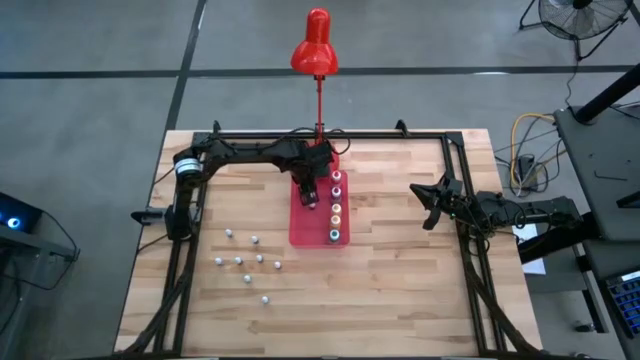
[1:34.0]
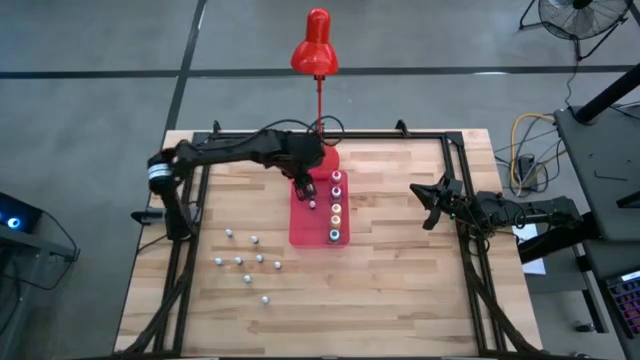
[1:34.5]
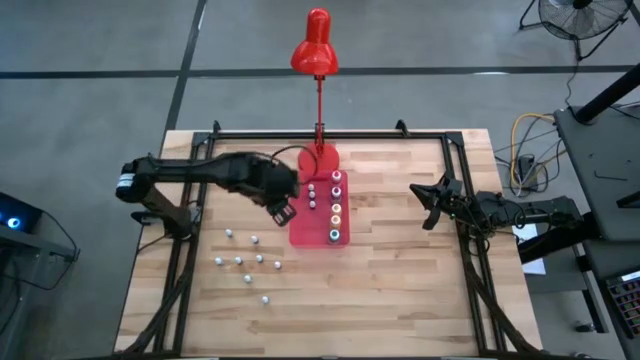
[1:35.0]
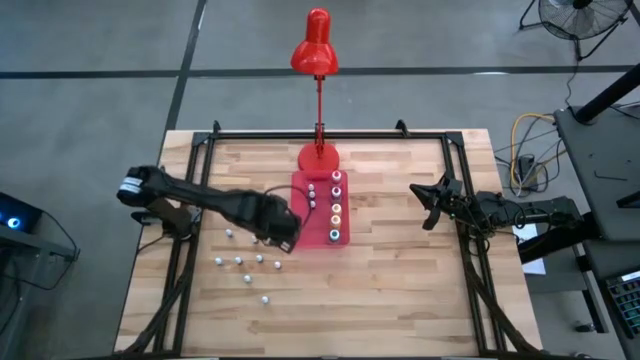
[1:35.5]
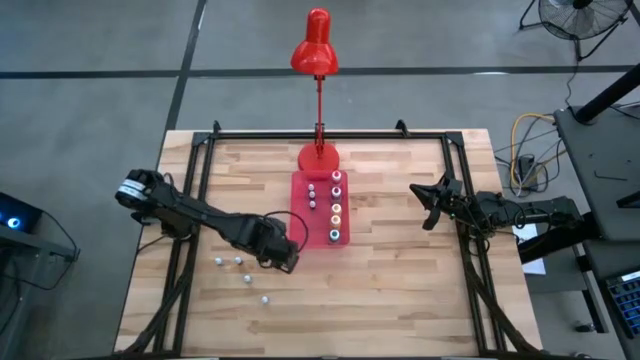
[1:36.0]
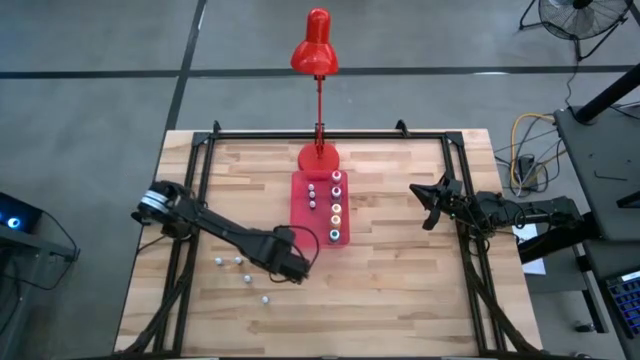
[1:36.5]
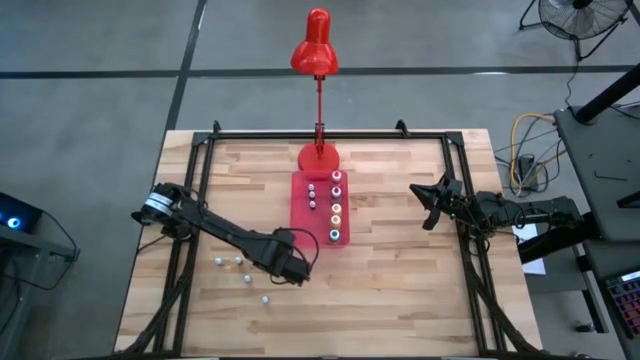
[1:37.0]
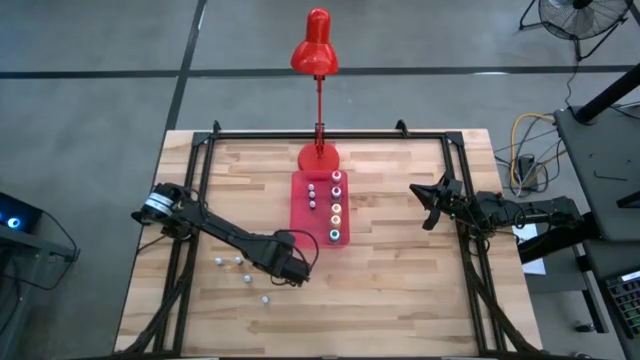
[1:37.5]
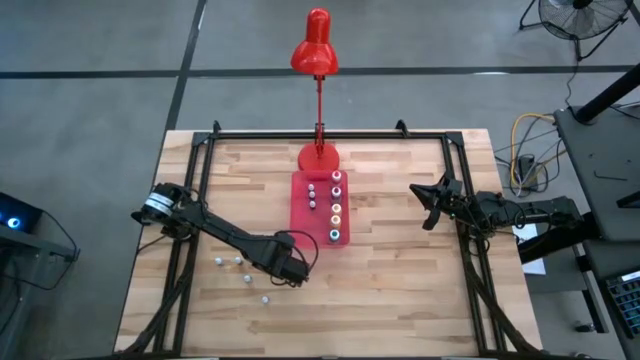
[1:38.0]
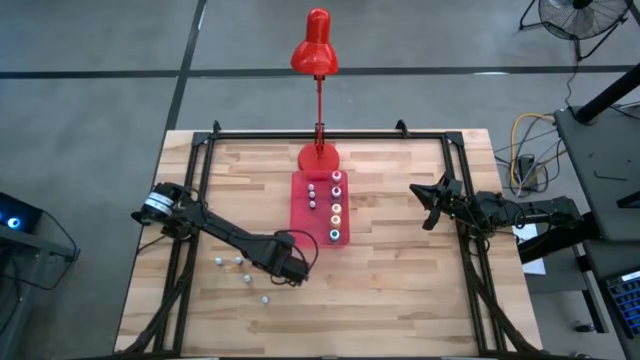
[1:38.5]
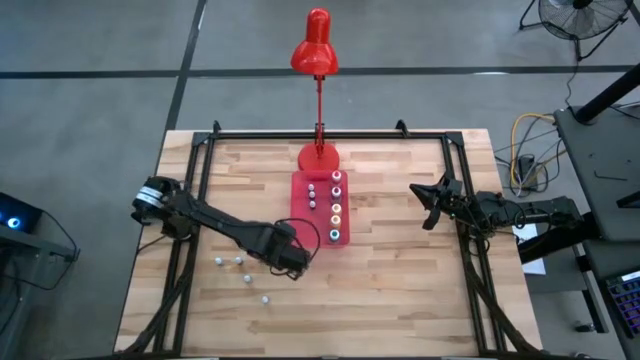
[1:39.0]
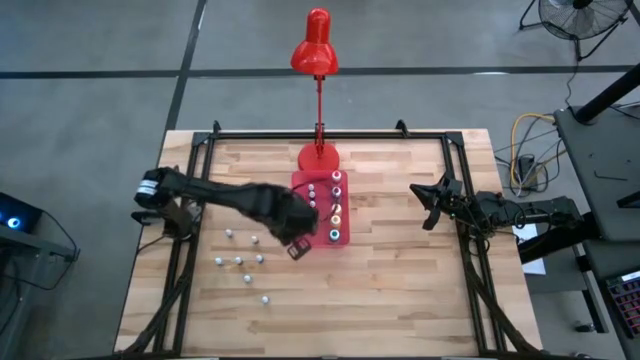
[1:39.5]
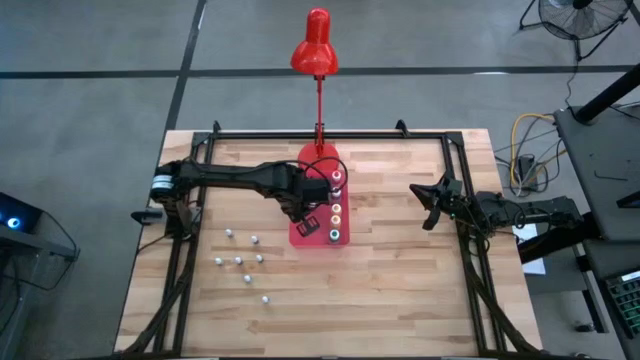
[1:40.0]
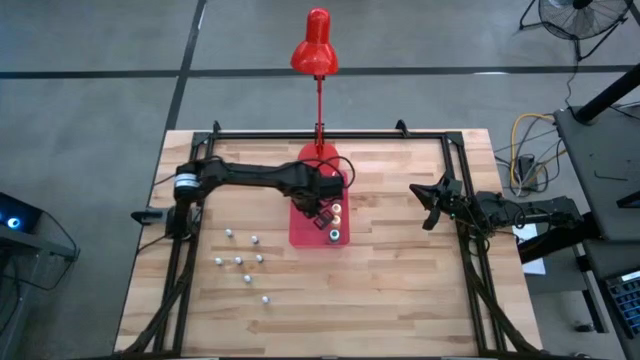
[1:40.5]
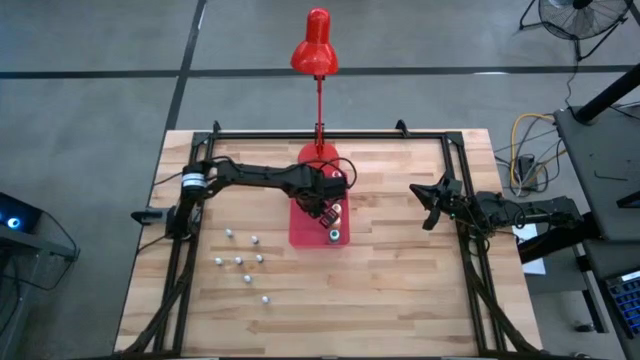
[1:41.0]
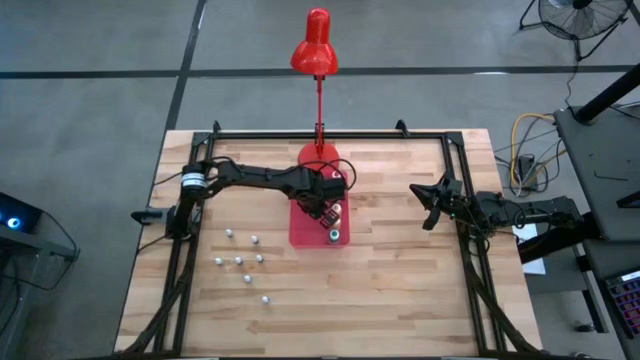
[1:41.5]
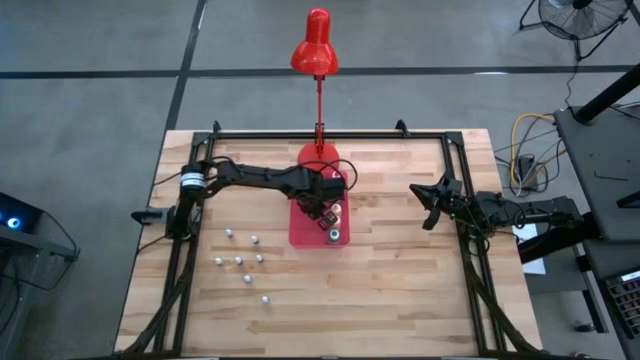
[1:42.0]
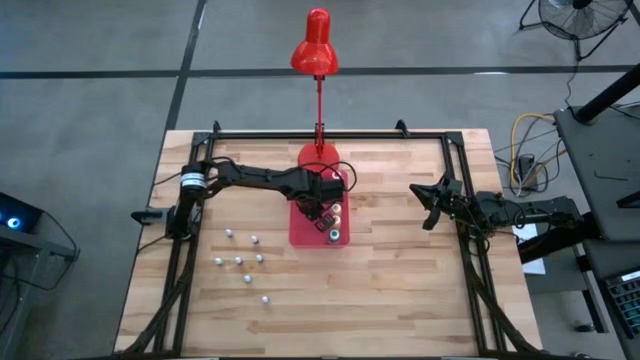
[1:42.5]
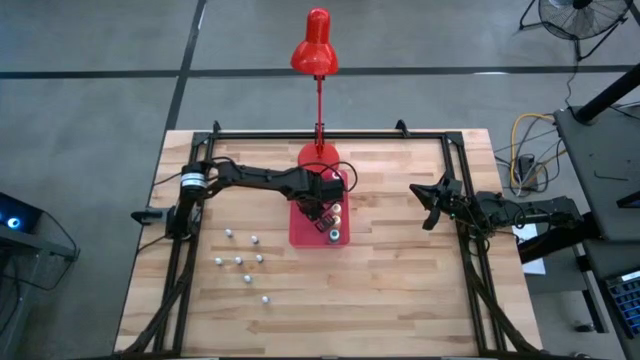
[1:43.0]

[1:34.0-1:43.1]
Task: Pick & Place food coloring
Put the small orange food coloring bottle into the pink bin

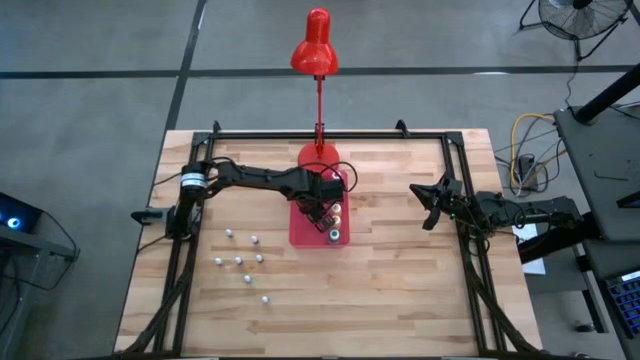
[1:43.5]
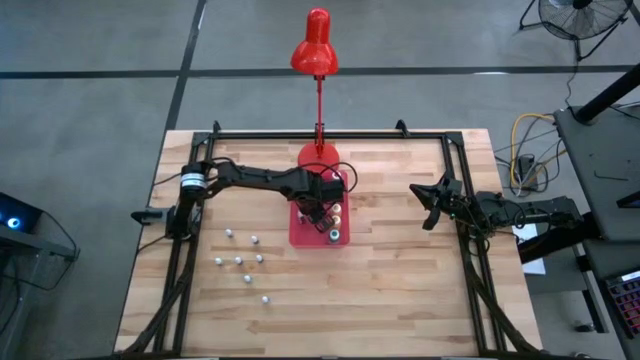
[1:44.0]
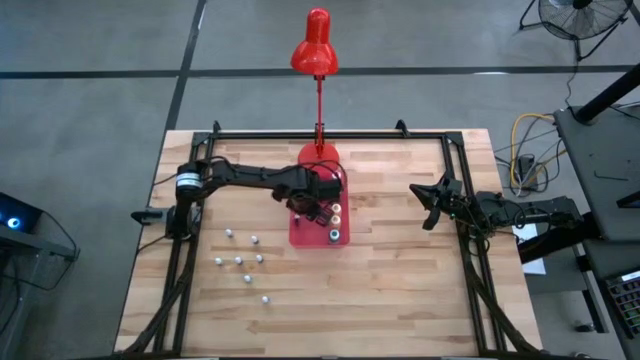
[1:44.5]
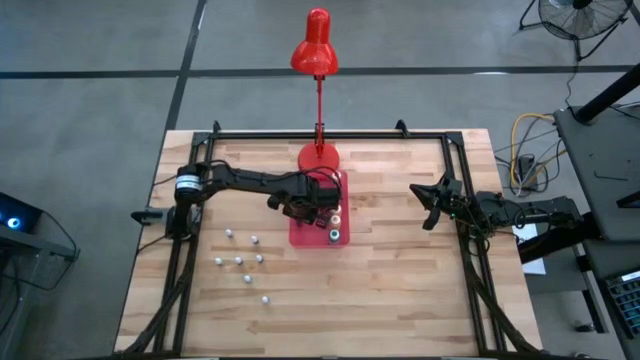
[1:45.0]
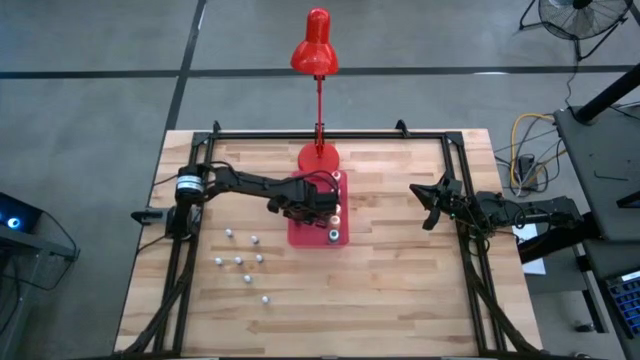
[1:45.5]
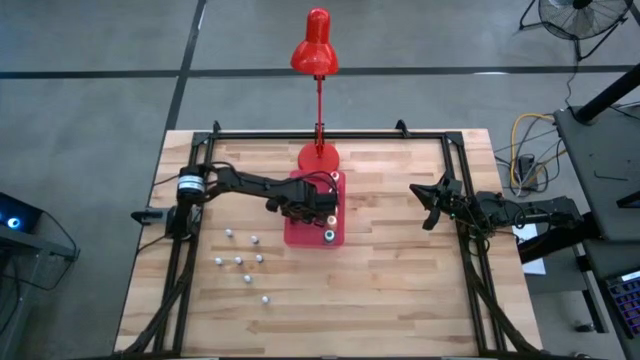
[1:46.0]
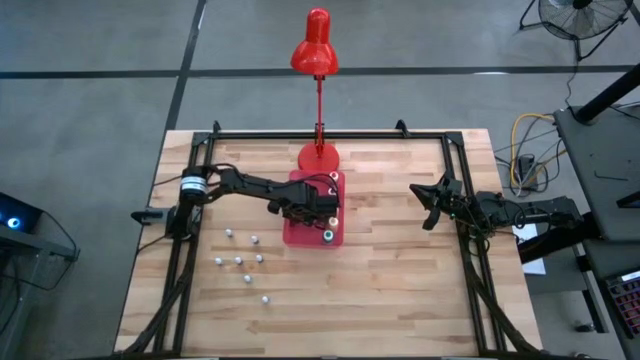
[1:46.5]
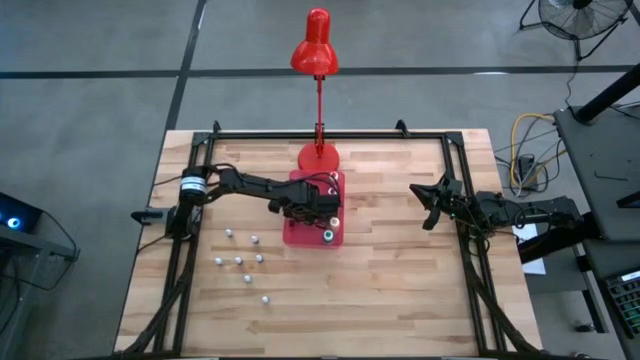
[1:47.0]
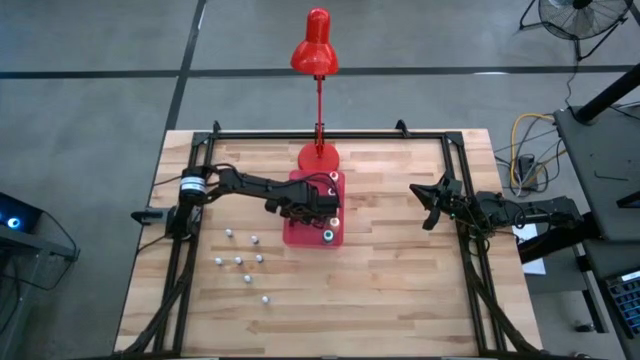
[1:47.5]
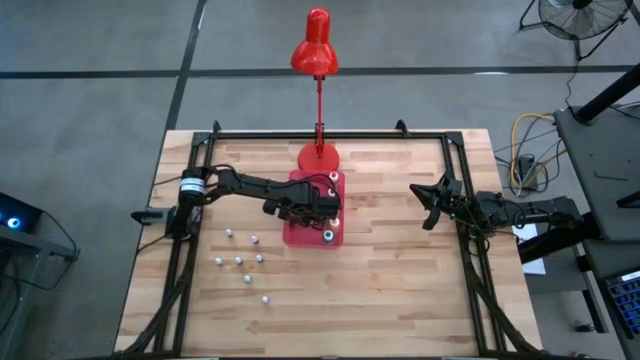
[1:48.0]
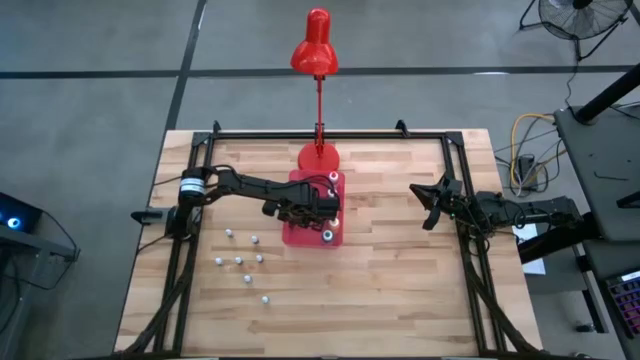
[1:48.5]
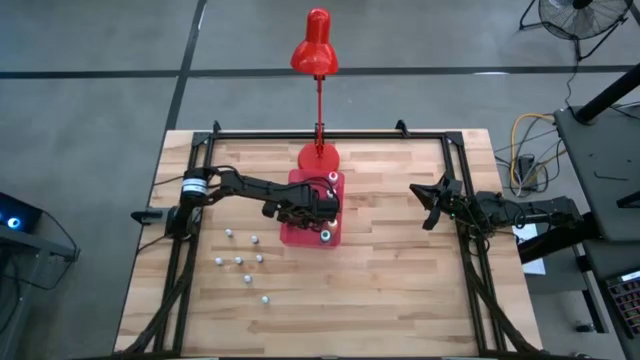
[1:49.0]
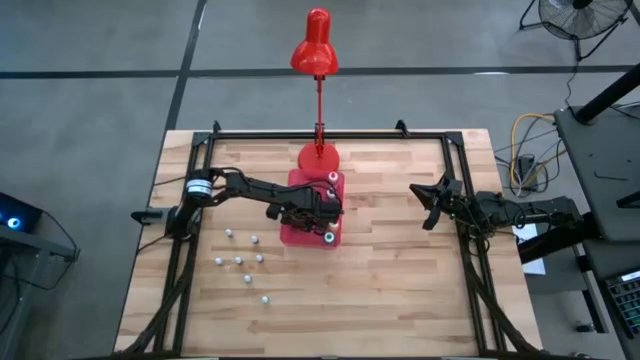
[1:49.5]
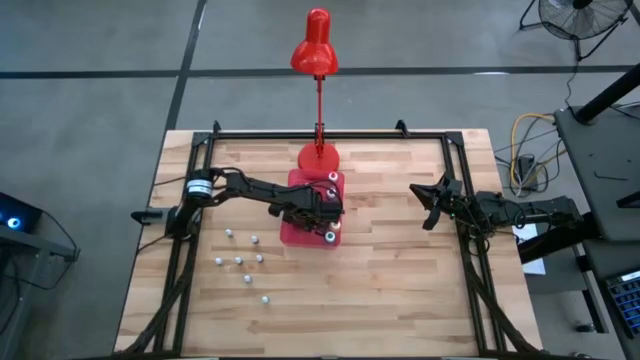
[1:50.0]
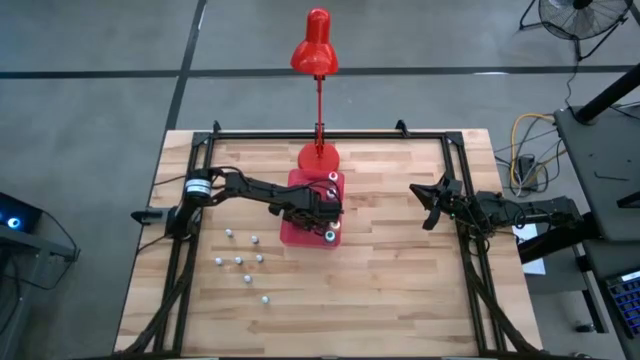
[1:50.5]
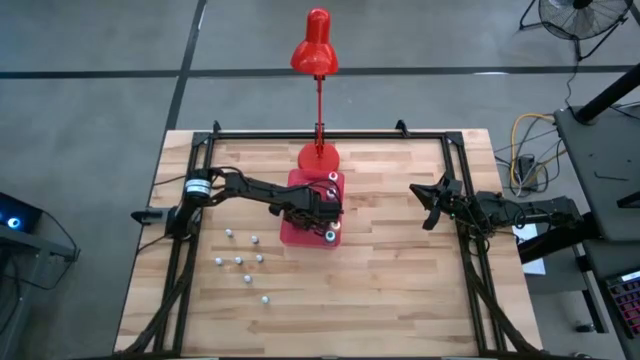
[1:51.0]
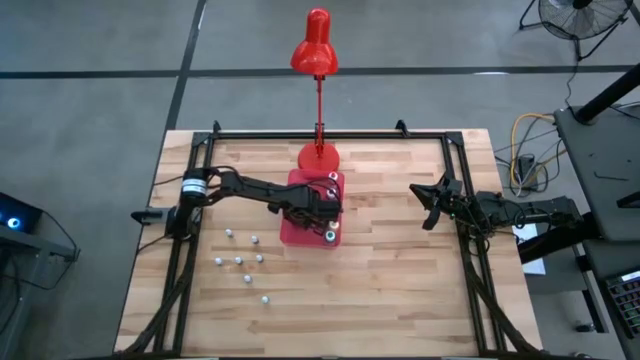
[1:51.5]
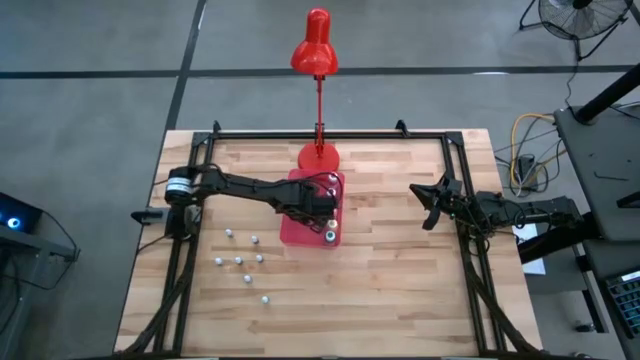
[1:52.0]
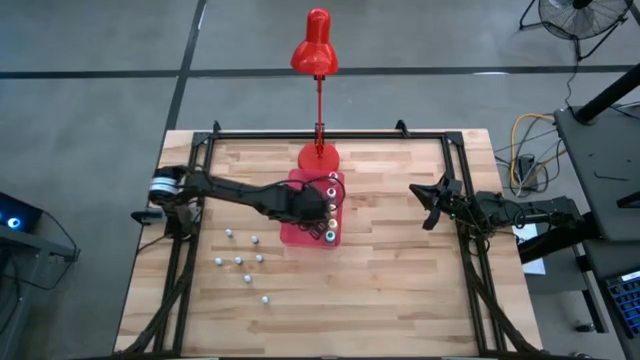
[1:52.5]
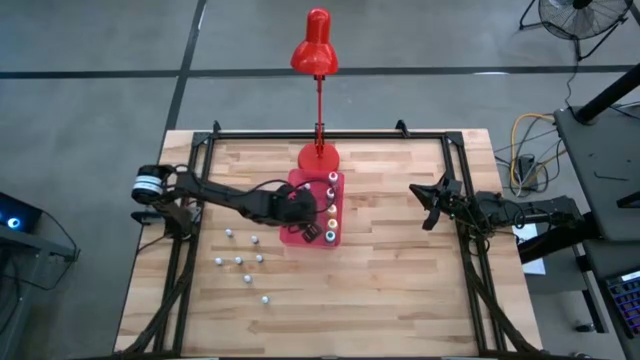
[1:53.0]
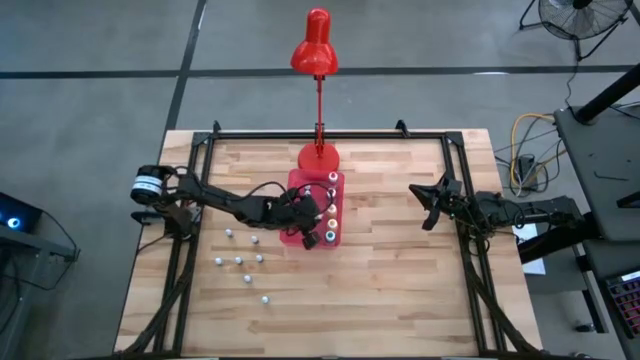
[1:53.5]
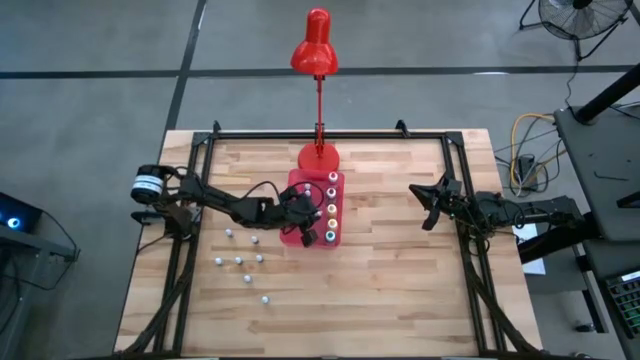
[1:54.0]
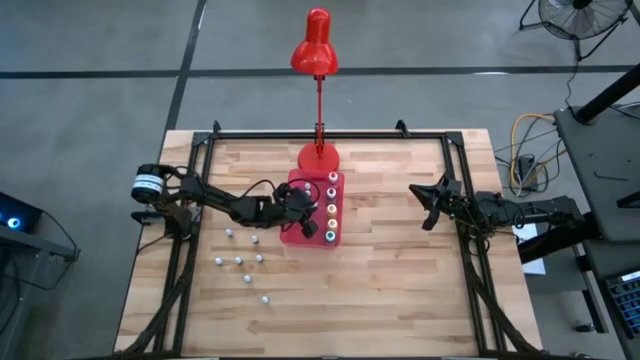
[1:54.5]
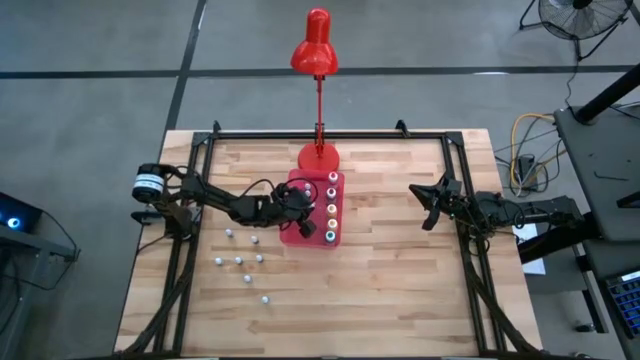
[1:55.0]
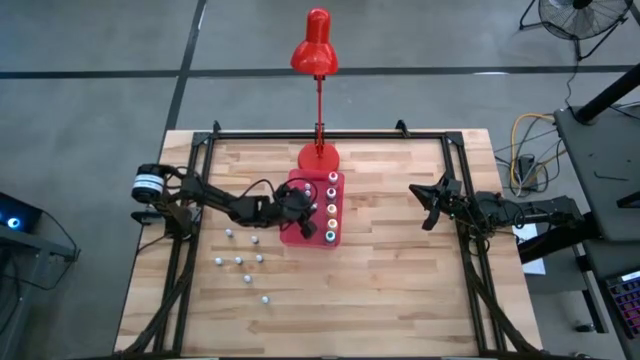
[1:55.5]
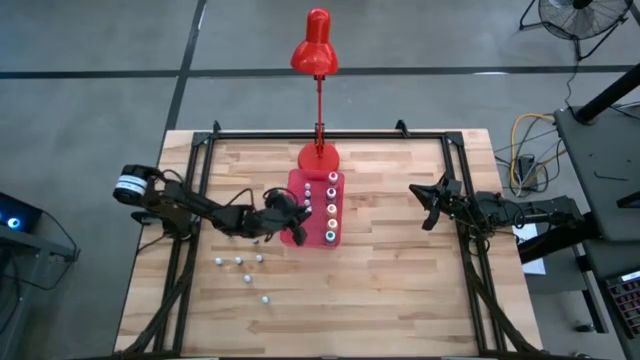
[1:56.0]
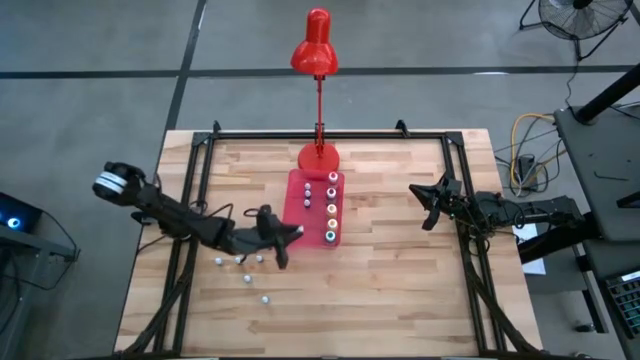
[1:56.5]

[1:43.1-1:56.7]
Put the small orange food coloring bottle into the pink bin
